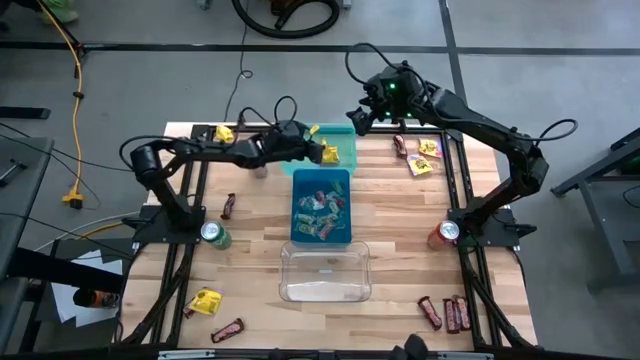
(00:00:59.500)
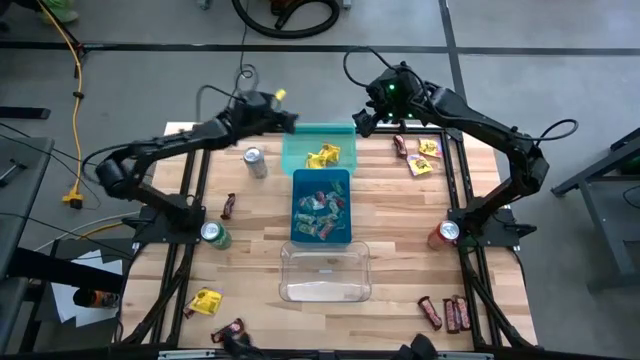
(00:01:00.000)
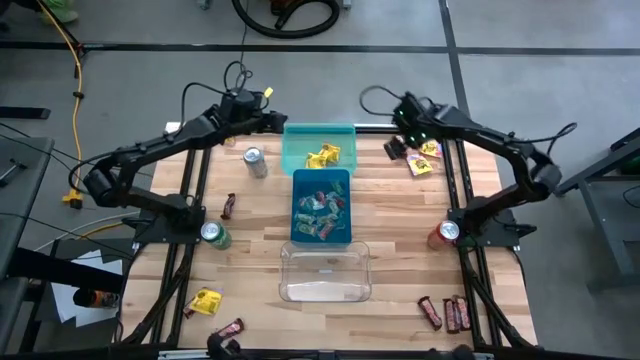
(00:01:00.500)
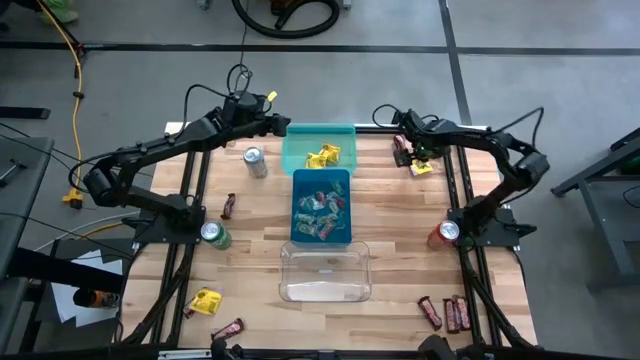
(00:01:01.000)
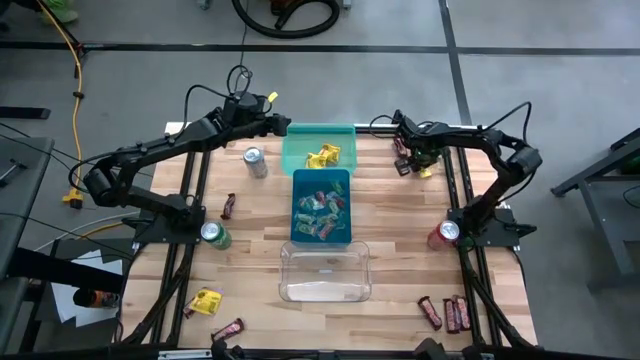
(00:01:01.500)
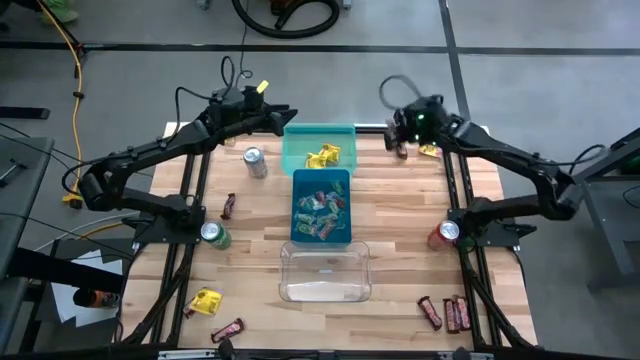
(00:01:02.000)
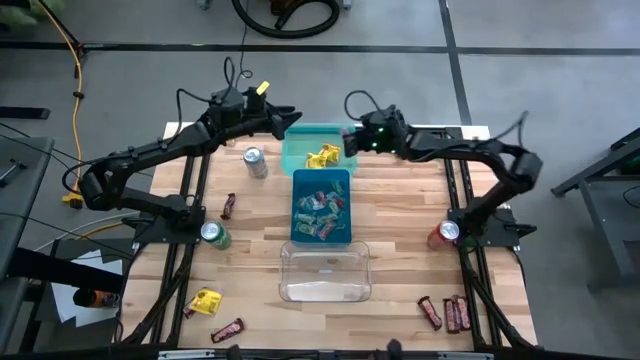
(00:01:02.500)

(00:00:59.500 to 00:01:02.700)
Task: Sort candy
Put the yellow candy into the light blue bin

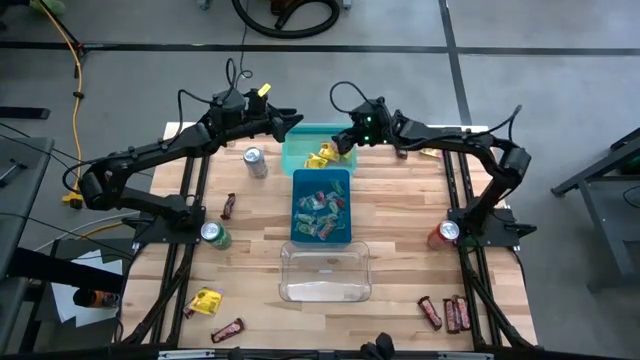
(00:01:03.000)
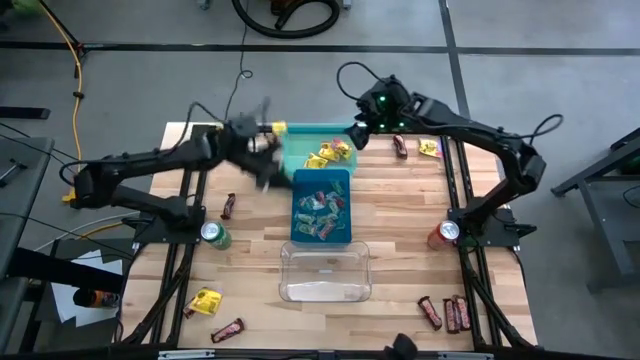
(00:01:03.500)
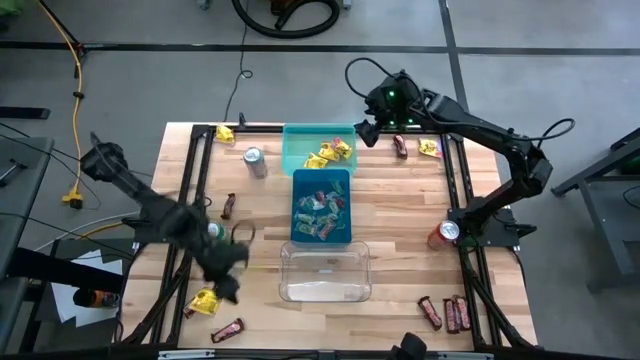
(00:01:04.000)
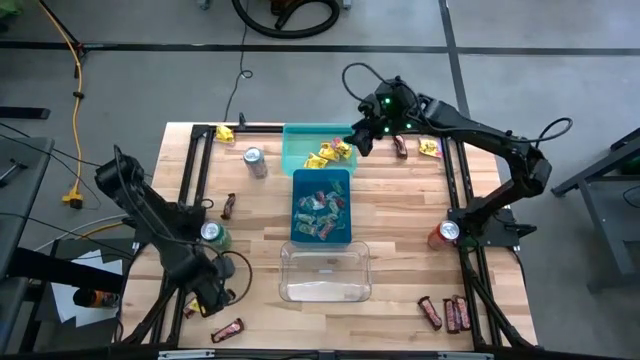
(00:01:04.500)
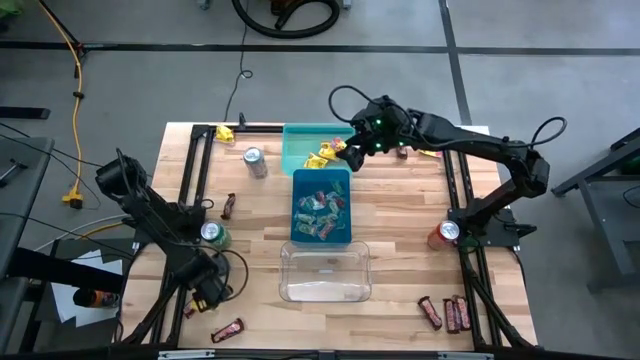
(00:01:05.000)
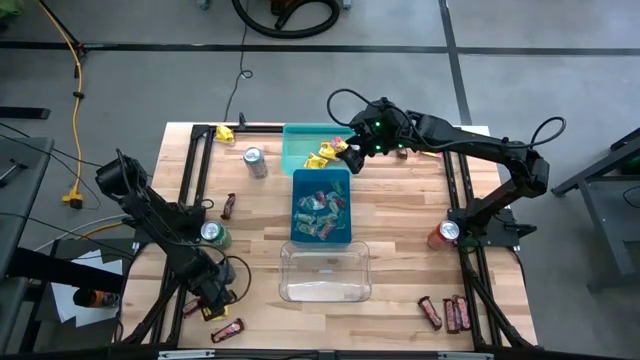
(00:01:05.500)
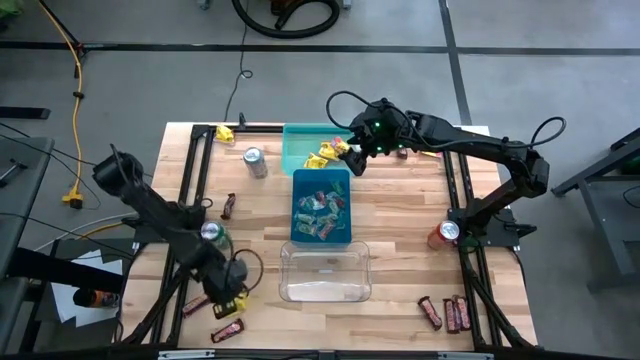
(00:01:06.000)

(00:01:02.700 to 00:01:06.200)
Put the yellow candy into the light blue bin

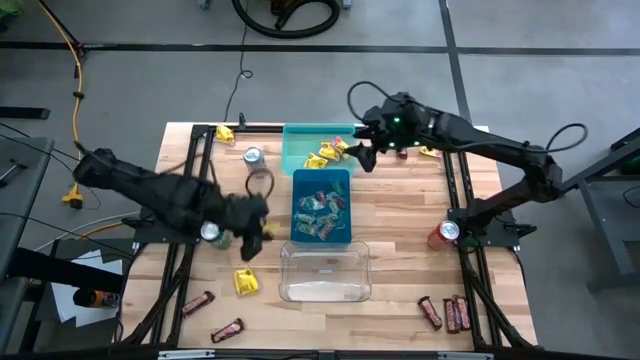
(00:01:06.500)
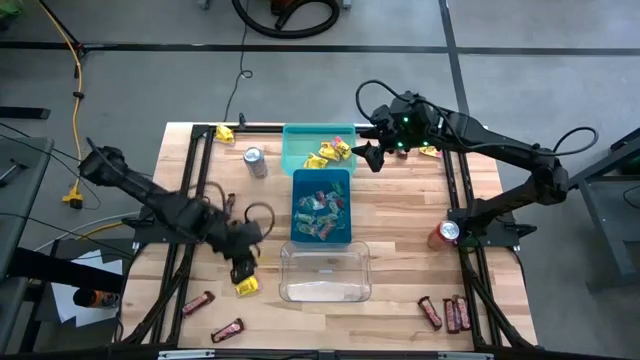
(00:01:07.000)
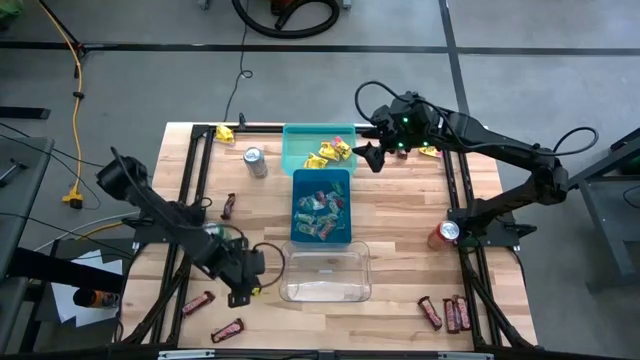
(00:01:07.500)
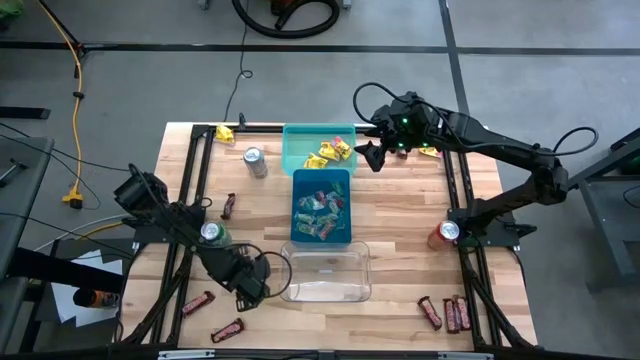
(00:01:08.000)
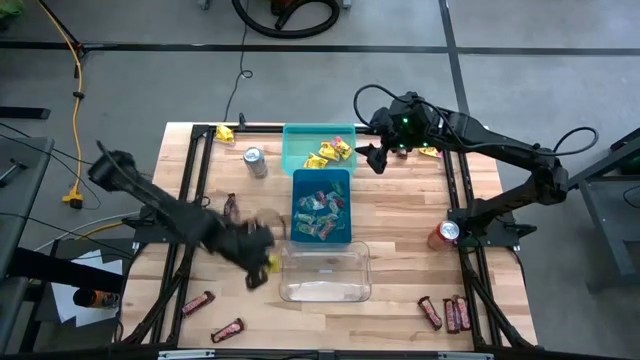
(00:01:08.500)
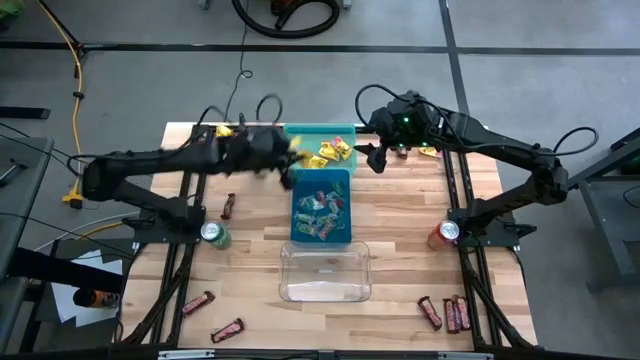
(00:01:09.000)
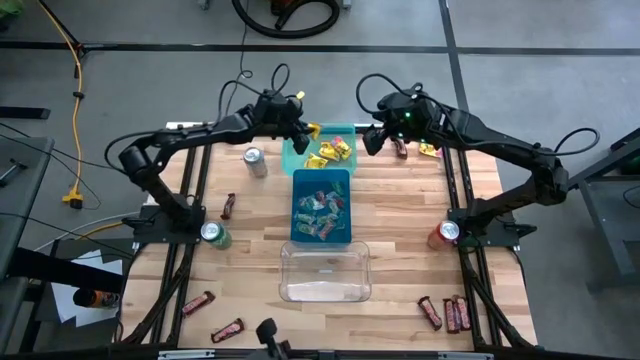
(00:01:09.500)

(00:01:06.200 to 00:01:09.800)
Put the yellow candy into the light blue bin

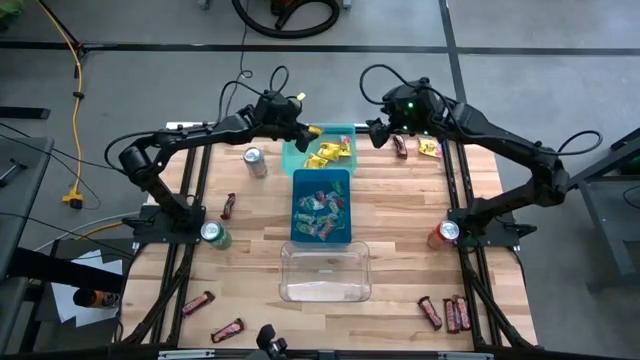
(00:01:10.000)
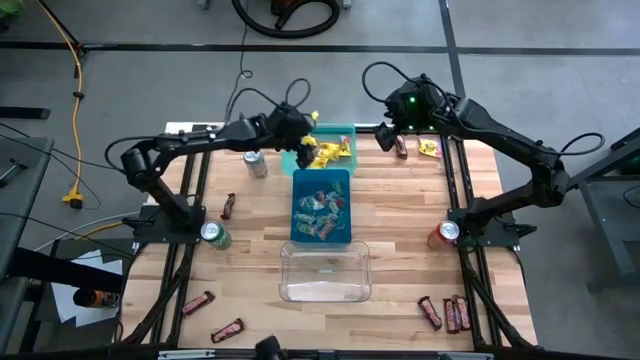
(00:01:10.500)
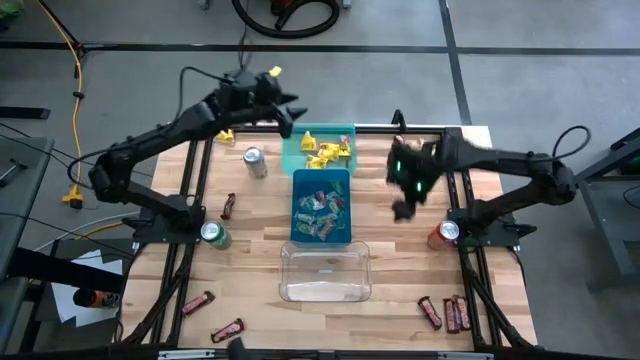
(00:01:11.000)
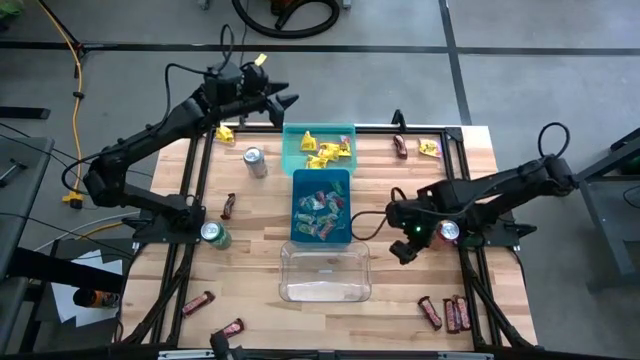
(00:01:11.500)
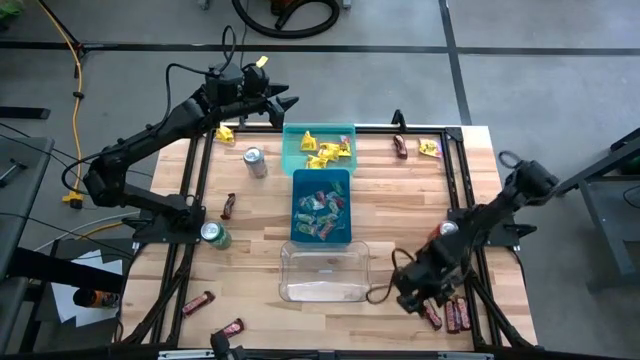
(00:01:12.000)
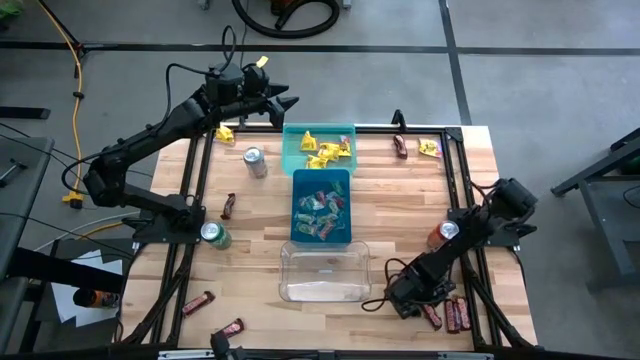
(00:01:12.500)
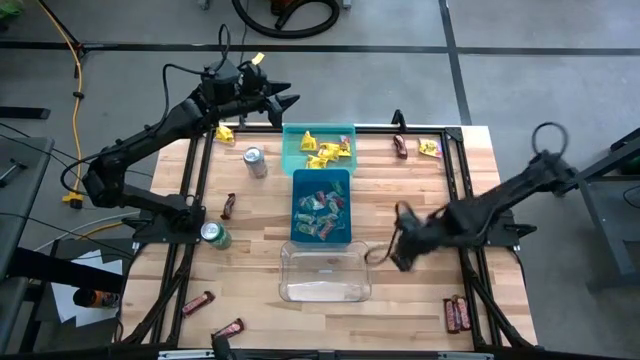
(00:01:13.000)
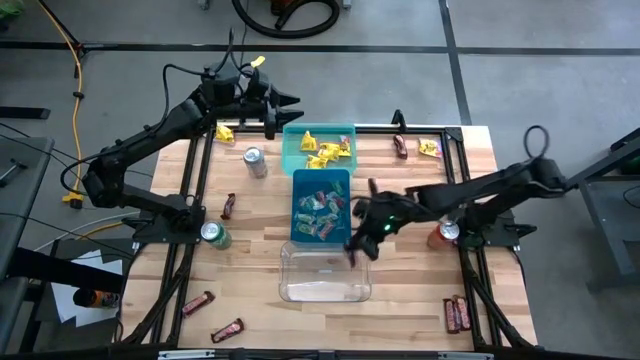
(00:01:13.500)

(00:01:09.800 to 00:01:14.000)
Put the brown candy into the transparent bin

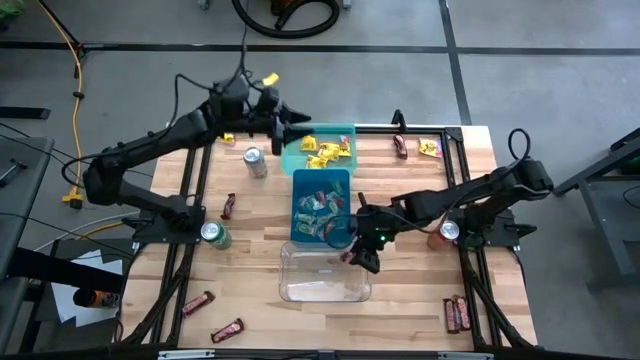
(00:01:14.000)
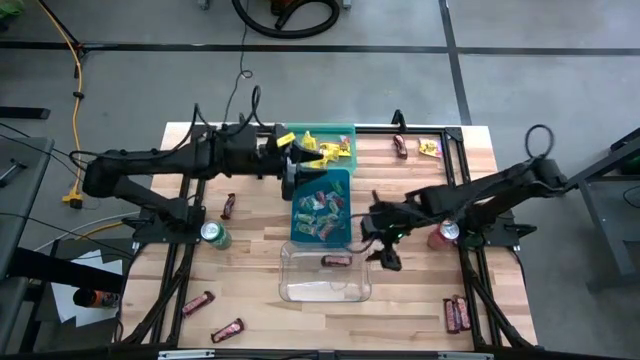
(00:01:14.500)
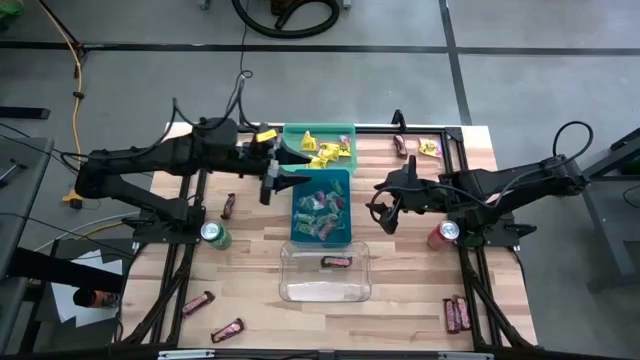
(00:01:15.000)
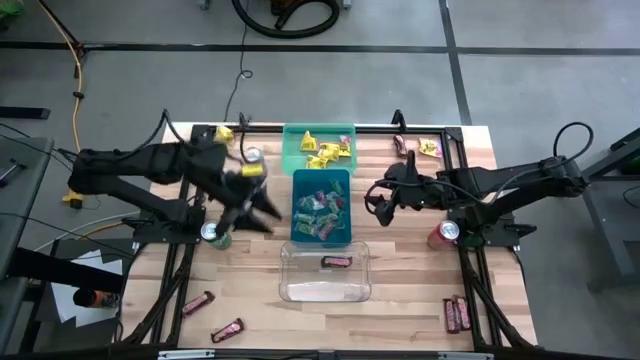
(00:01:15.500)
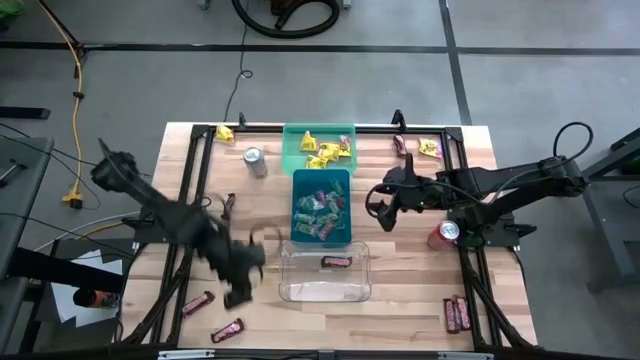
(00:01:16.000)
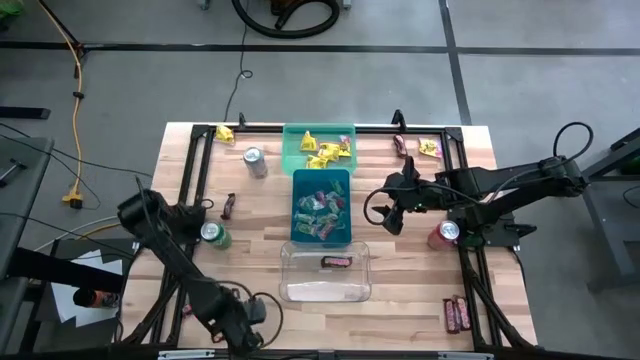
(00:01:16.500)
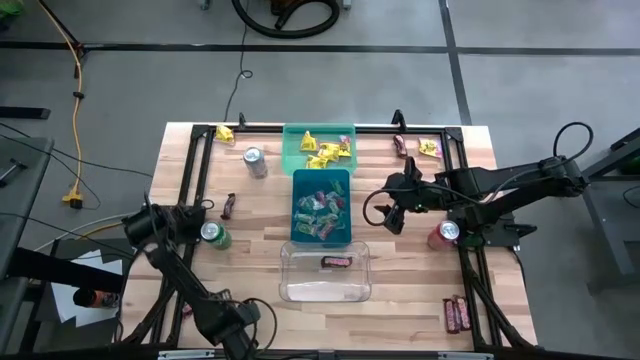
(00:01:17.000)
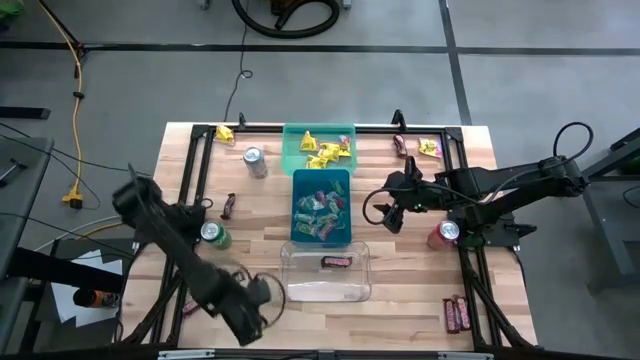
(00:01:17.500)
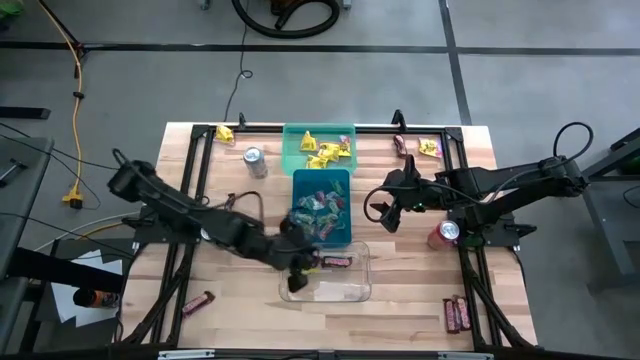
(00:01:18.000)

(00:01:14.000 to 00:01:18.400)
Put the brown candy into the transparent bin

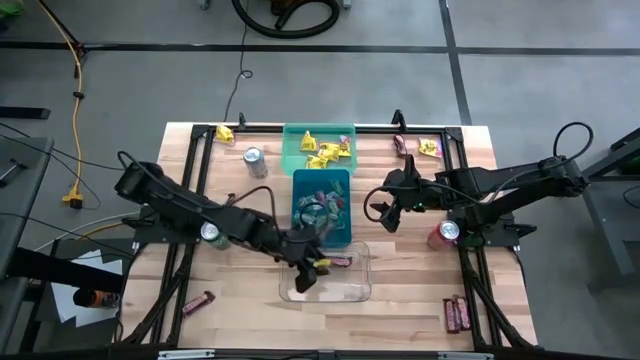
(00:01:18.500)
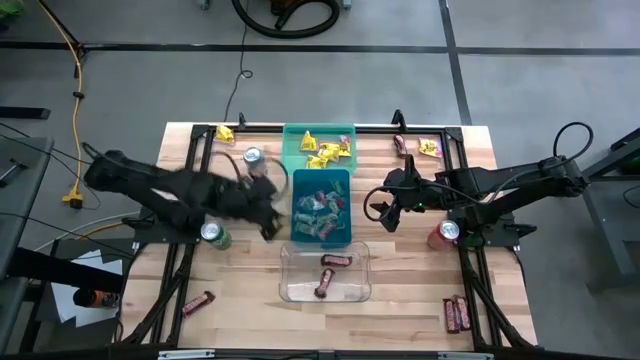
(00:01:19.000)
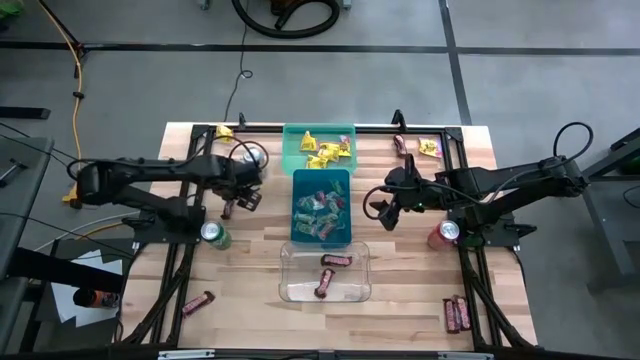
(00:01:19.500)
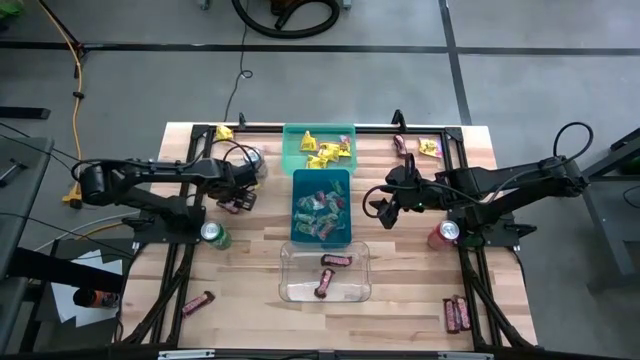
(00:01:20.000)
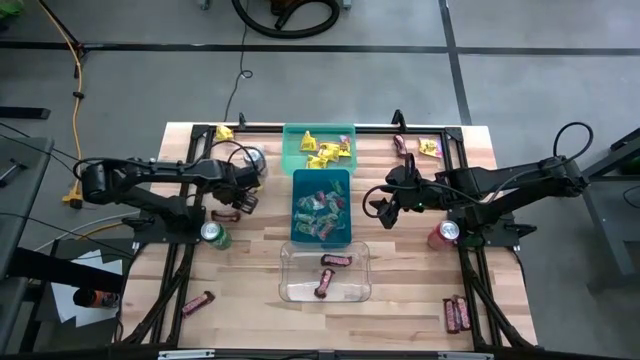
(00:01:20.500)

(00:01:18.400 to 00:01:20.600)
Put the brown candy into the transparent bin

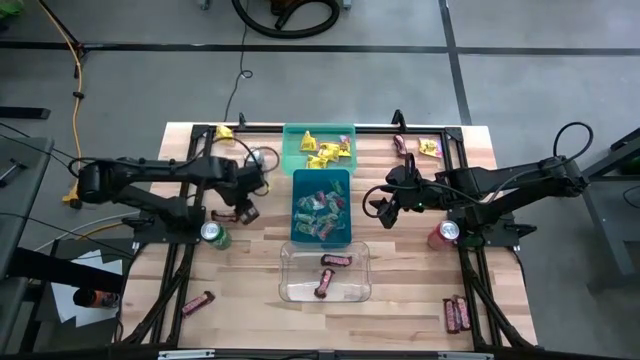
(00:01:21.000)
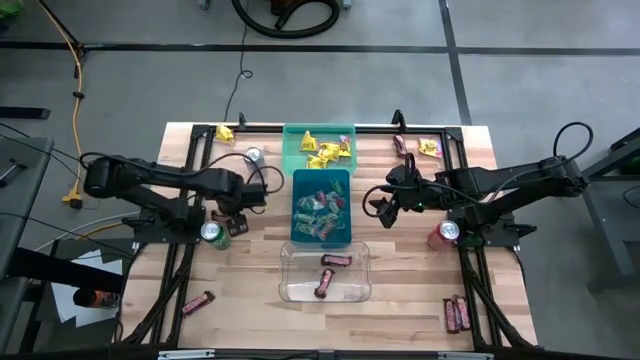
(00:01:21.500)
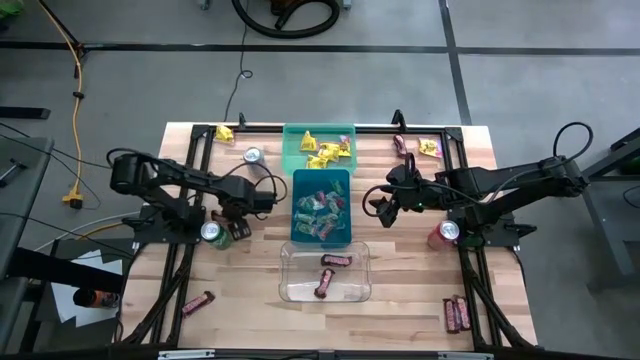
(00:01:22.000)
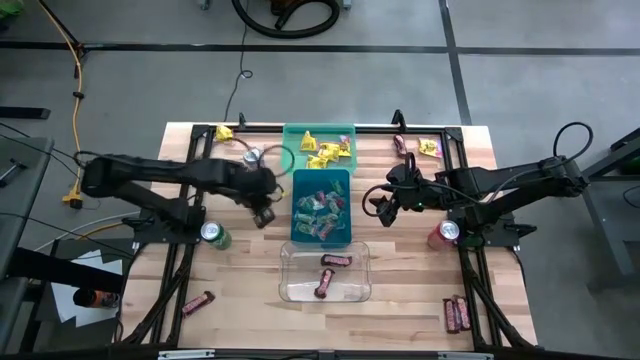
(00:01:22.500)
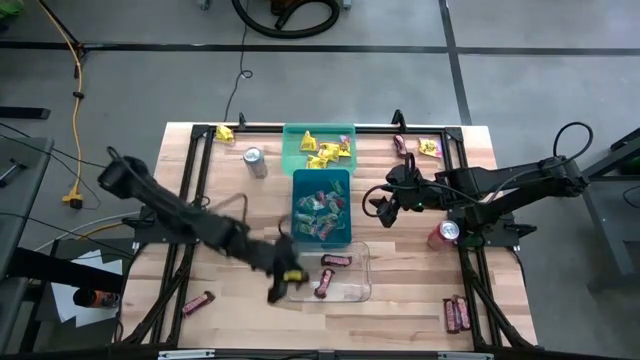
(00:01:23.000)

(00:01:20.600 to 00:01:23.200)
Put the brown candy into the transparent bin
